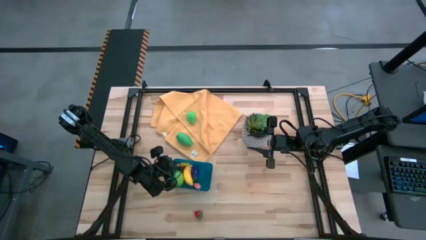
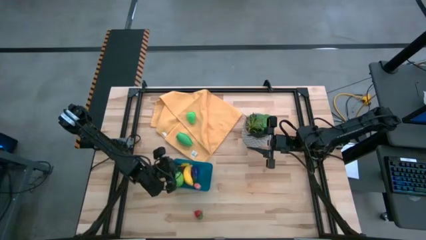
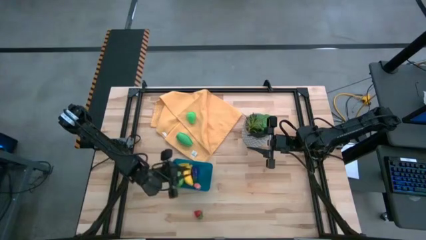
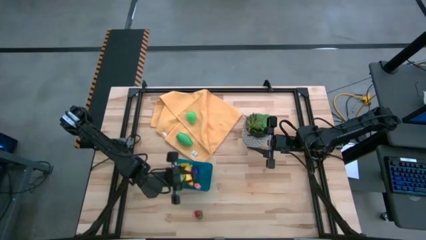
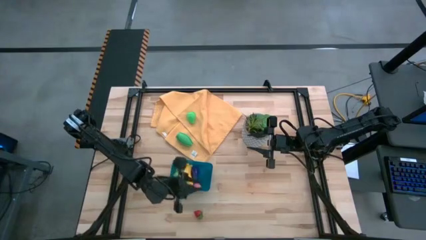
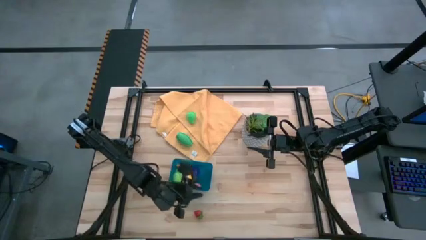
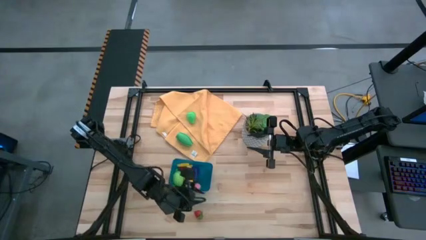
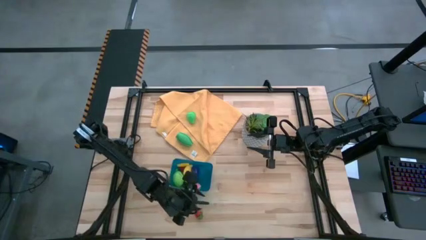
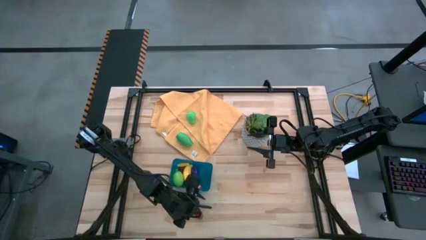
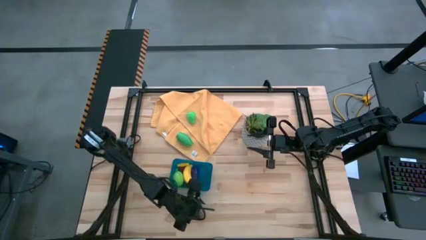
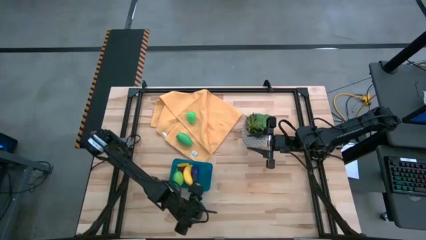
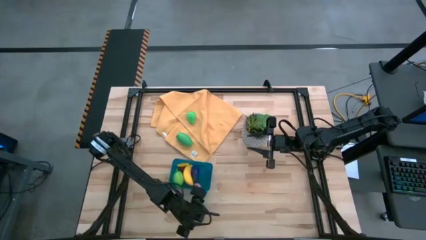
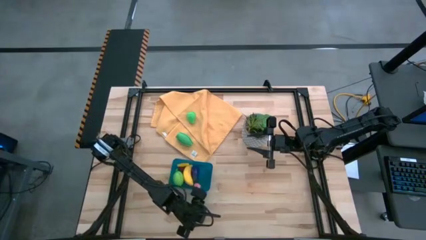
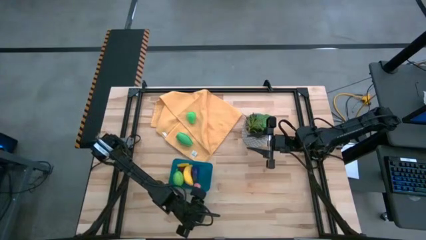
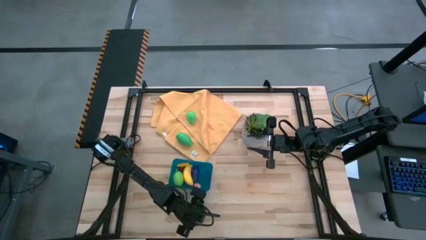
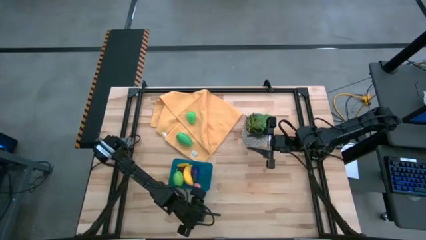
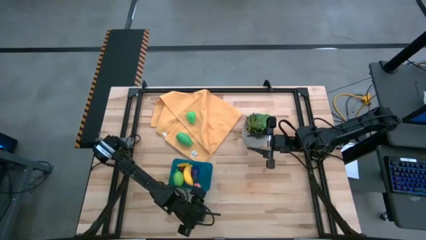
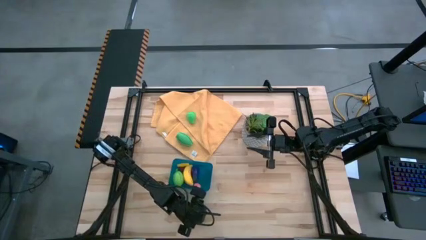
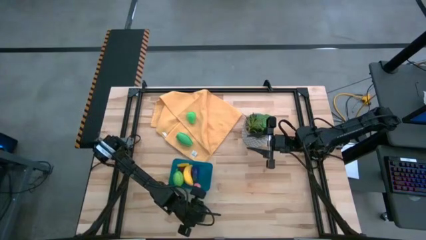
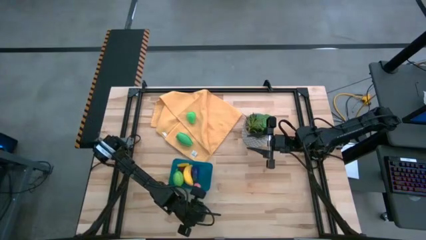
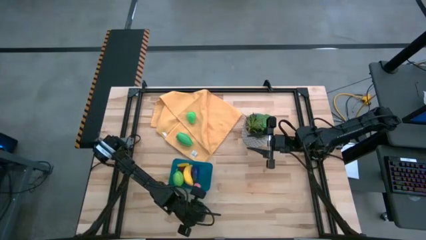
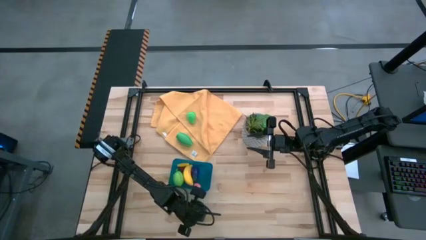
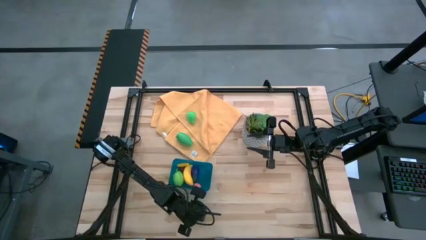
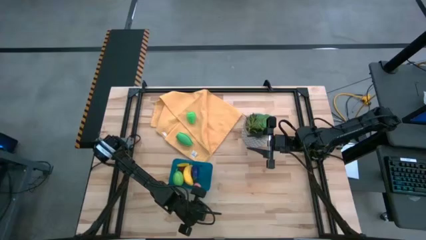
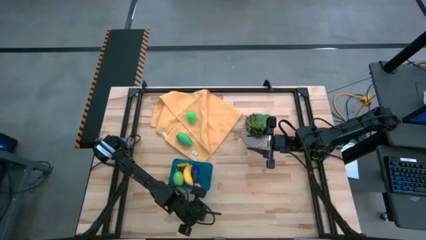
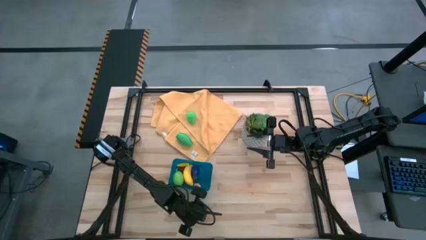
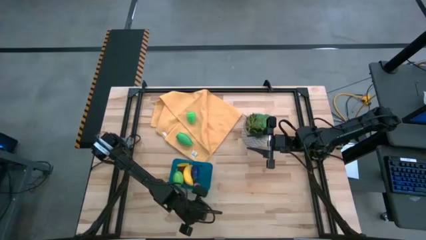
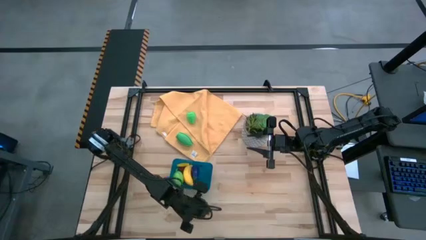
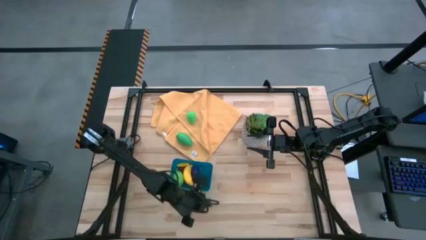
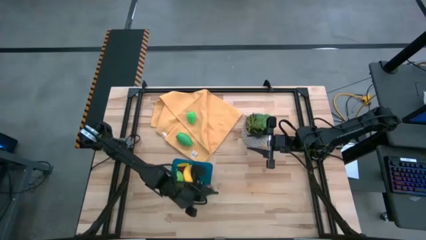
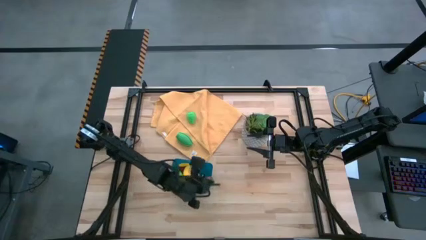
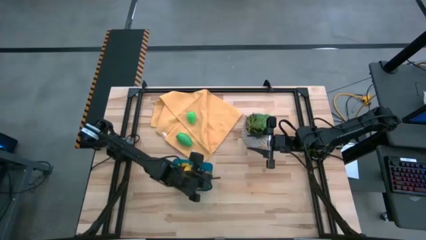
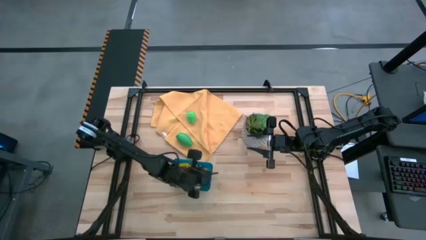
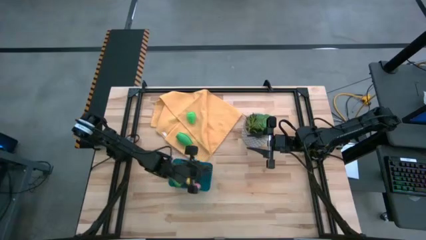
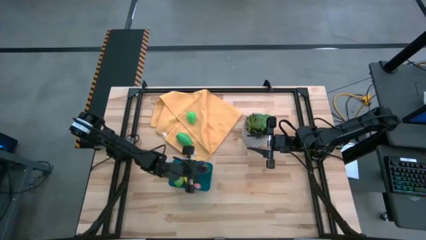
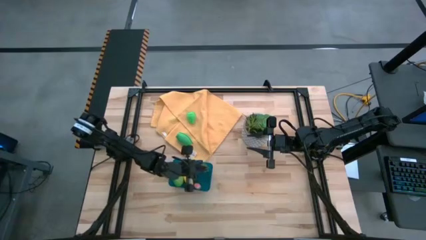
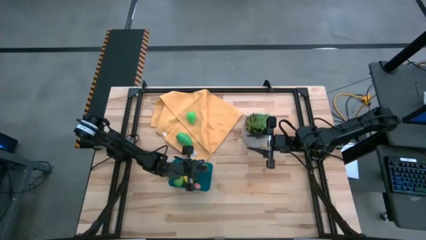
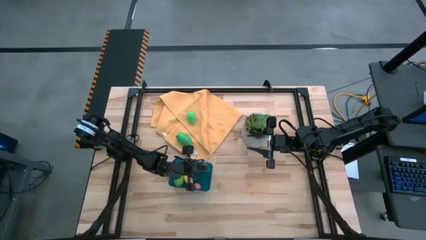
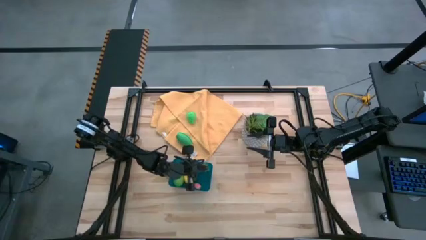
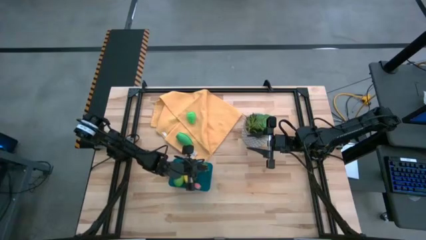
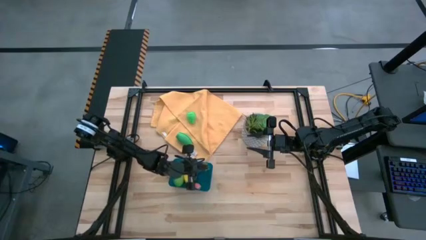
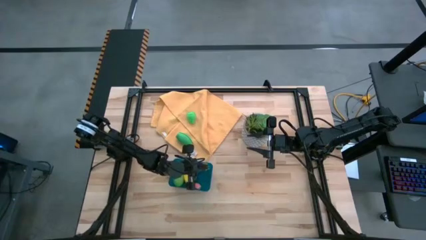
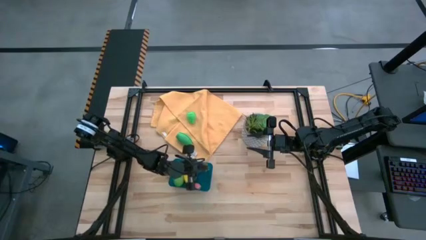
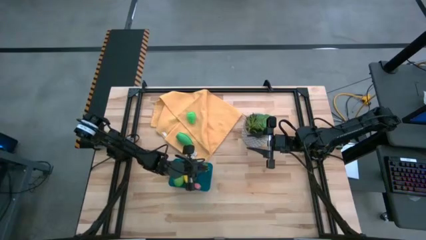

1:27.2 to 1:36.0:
Task: Pick and placing Produce into tupperware
Put the strawberry into the blue bin

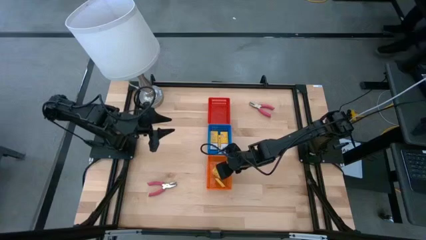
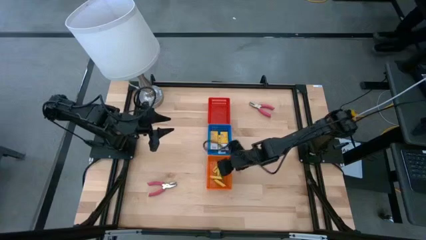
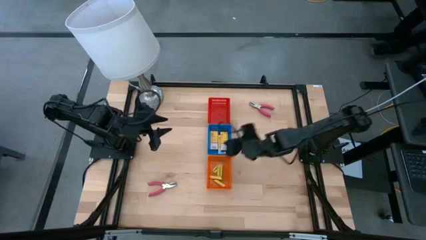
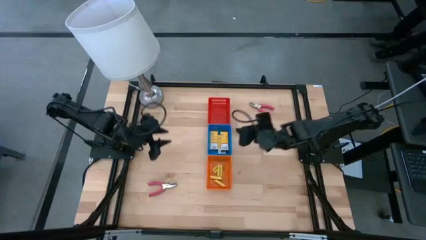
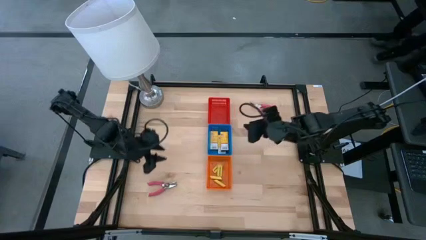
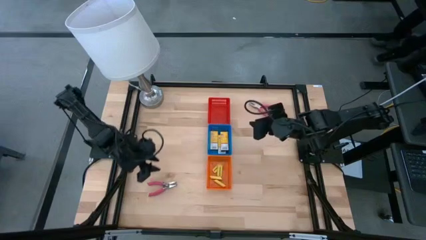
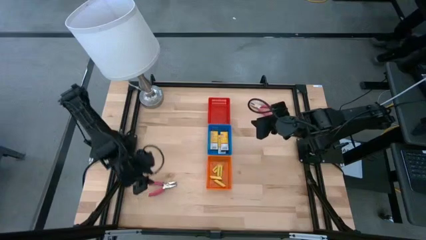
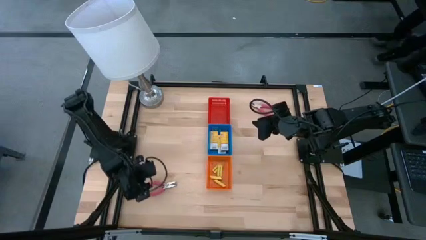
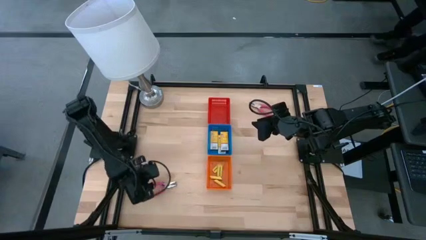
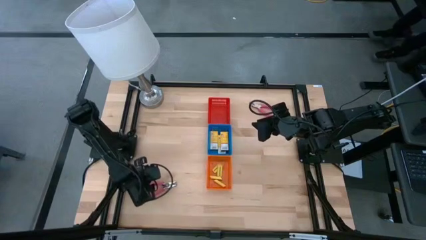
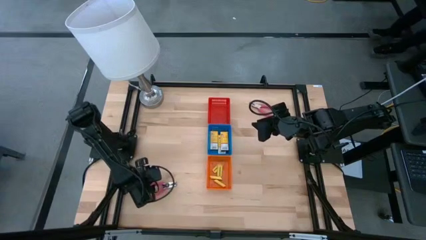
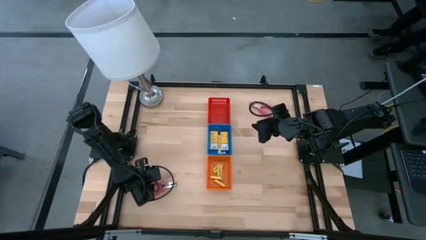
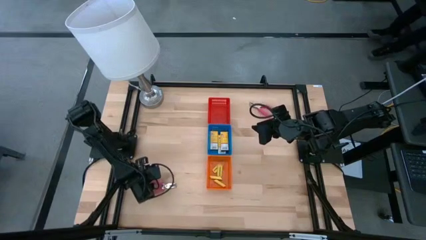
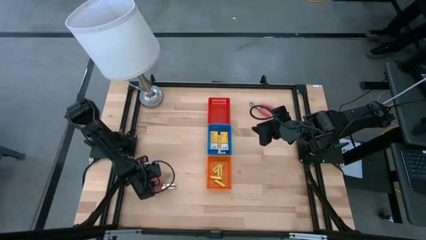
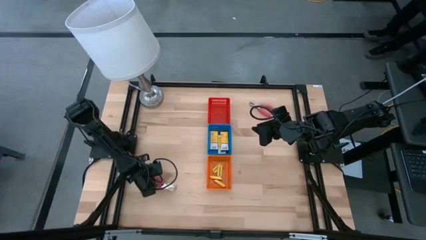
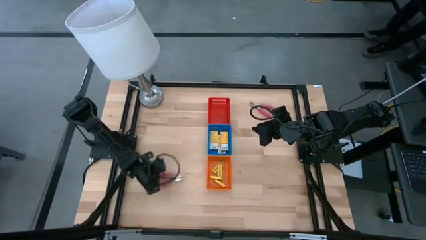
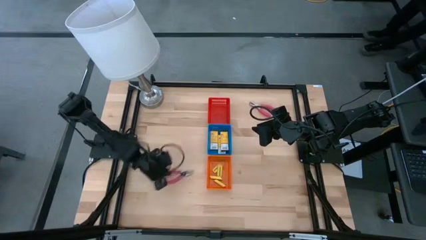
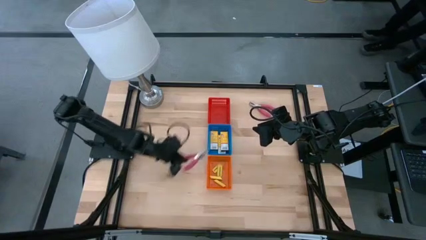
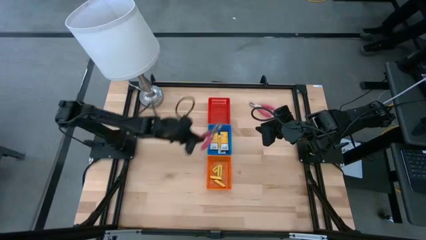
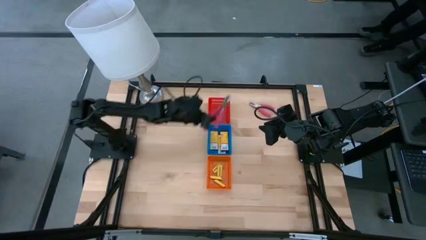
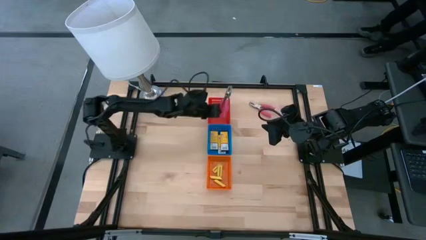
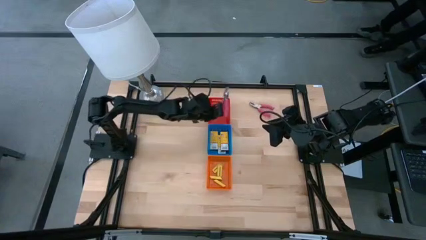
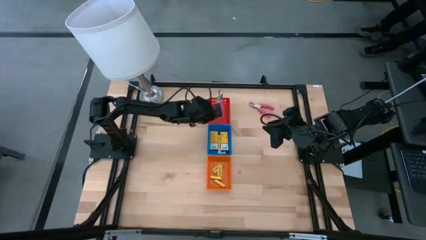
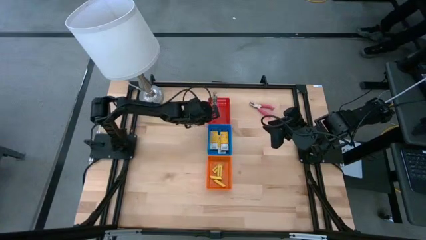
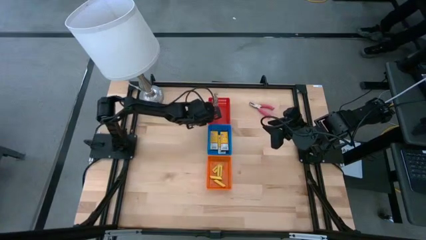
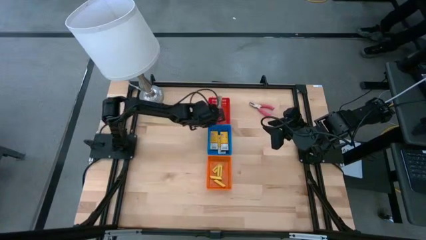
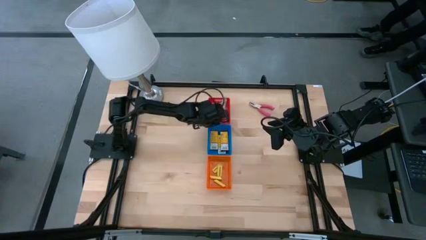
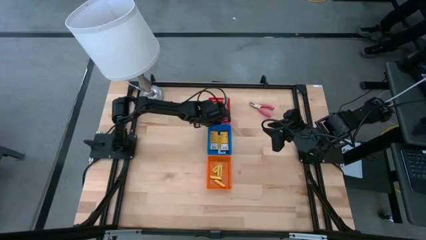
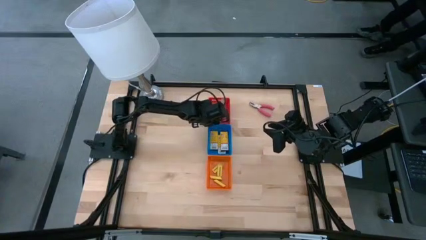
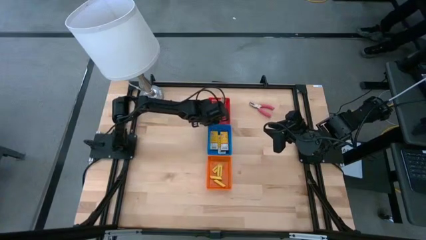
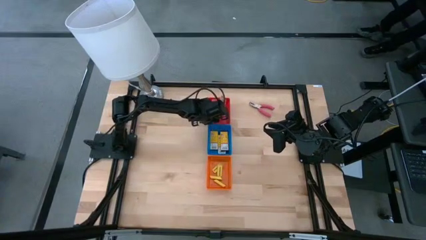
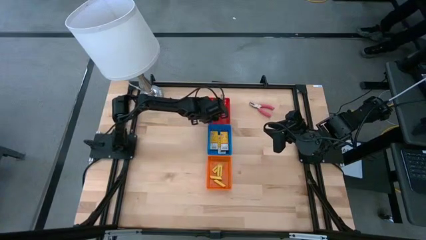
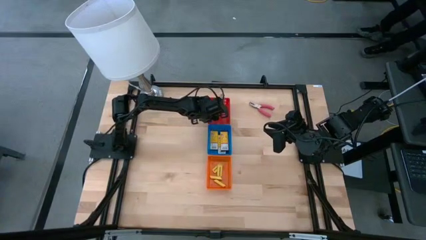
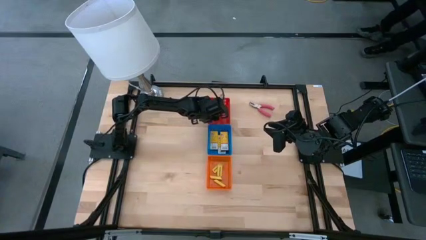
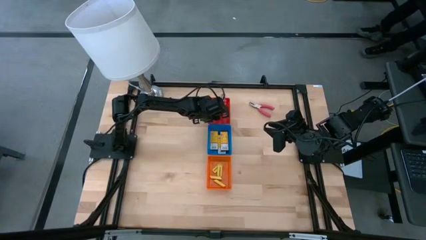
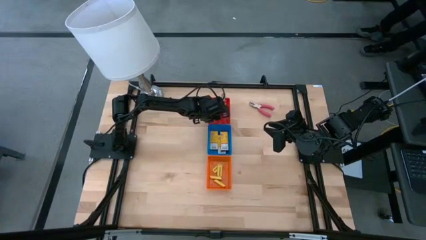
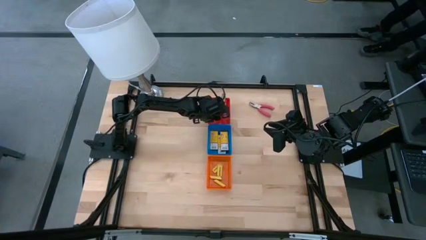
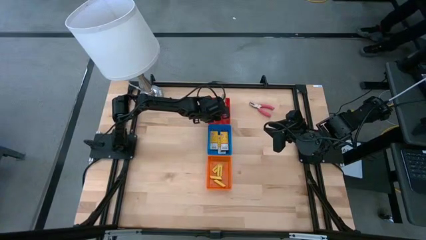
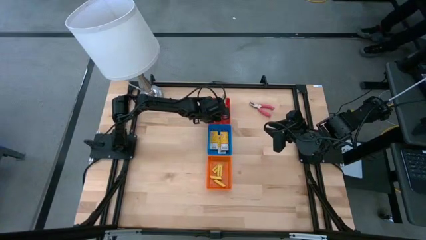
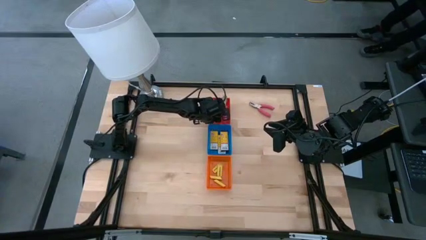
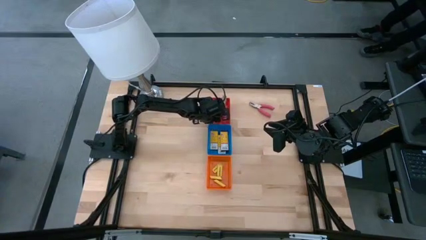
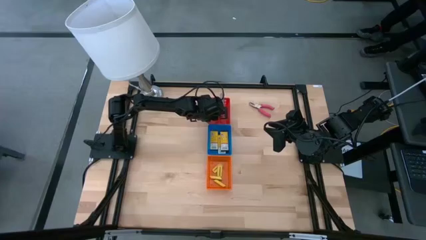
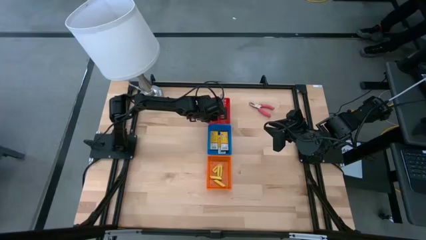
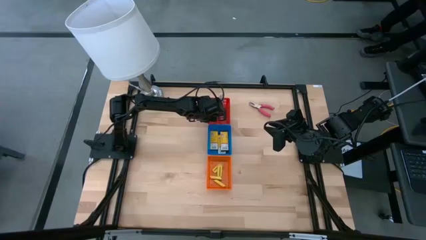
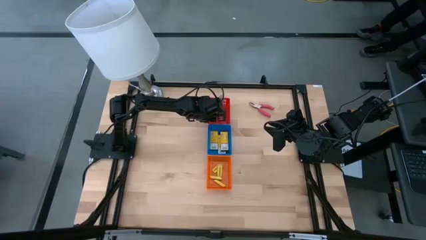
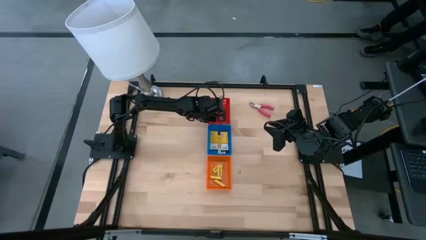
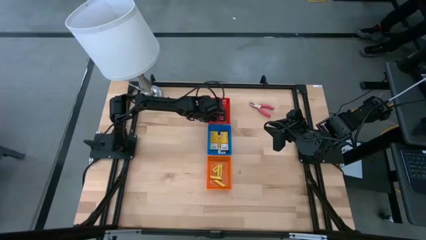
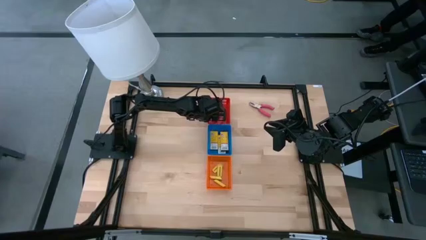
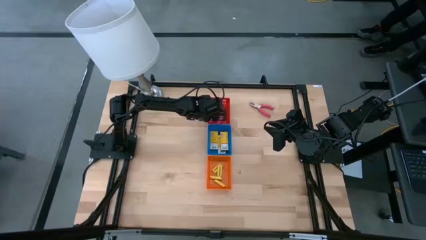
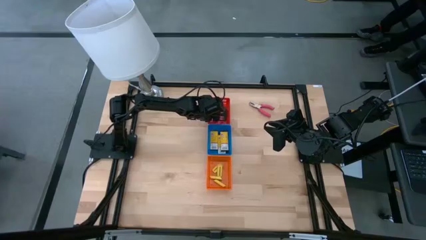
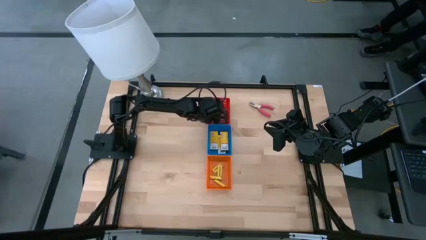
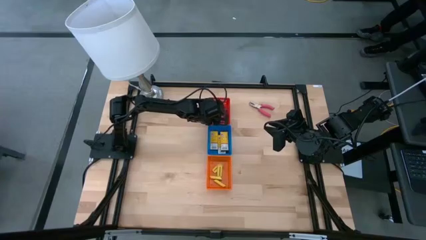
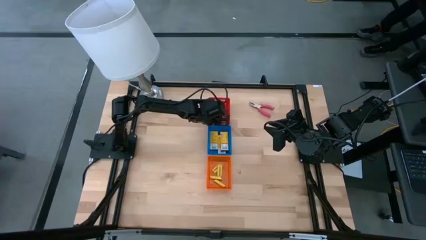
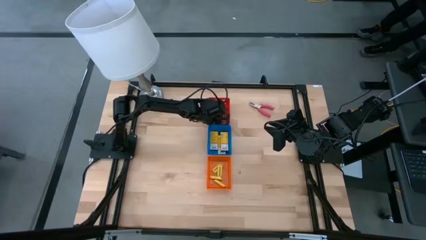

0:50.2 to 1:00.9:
Task: Pick & Place School Supplies
Put the pink hole puncher into the red bin
